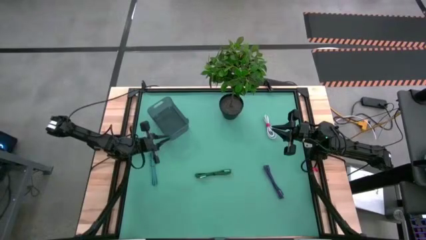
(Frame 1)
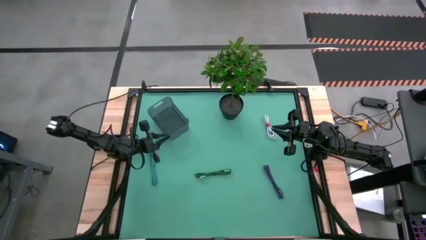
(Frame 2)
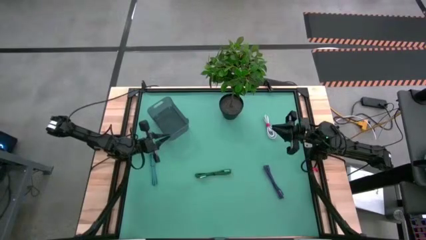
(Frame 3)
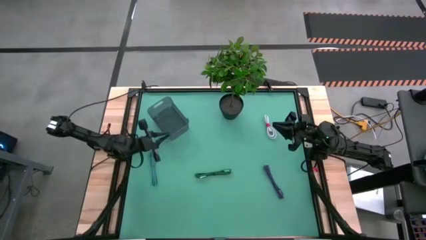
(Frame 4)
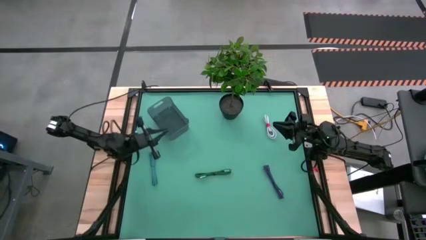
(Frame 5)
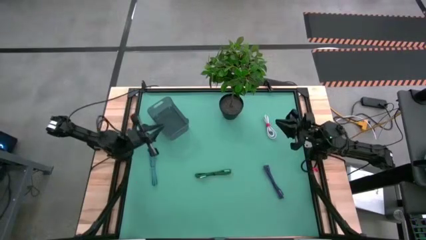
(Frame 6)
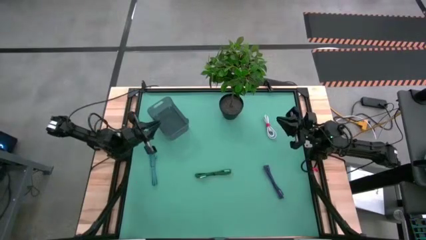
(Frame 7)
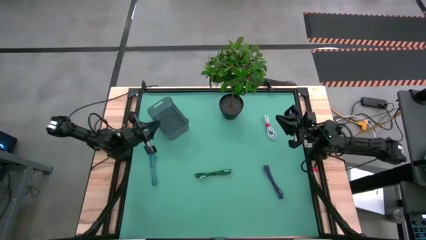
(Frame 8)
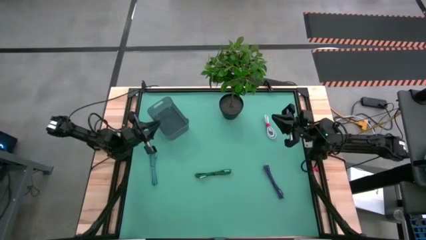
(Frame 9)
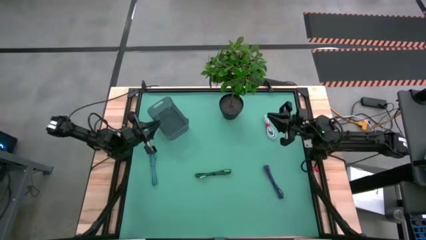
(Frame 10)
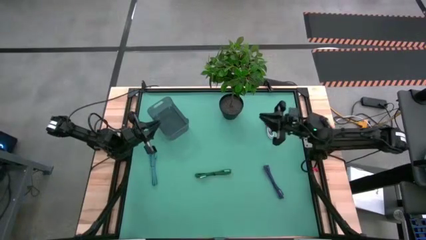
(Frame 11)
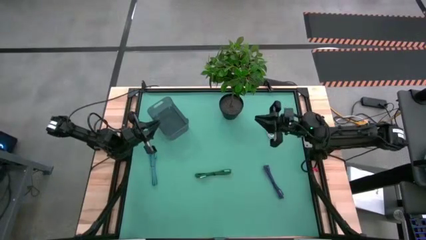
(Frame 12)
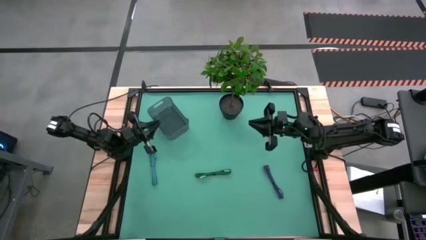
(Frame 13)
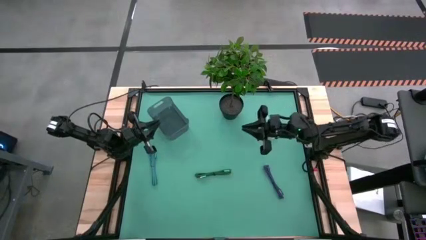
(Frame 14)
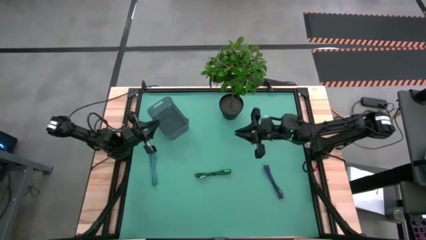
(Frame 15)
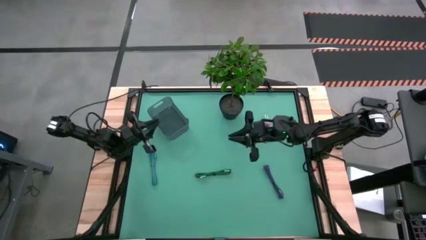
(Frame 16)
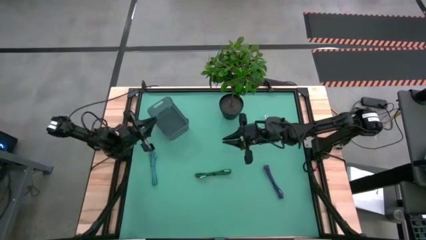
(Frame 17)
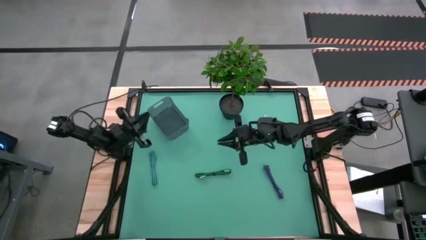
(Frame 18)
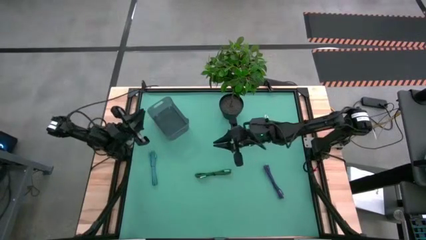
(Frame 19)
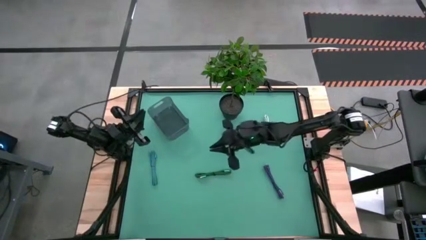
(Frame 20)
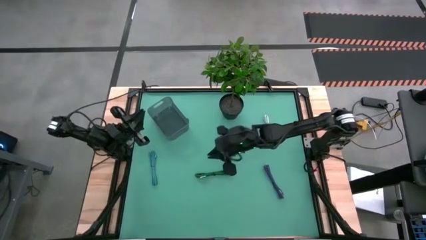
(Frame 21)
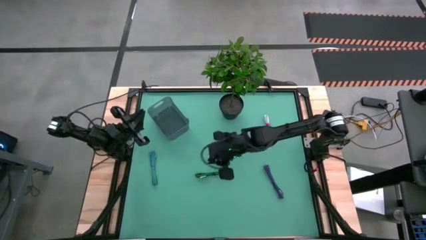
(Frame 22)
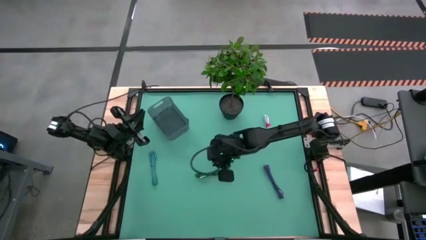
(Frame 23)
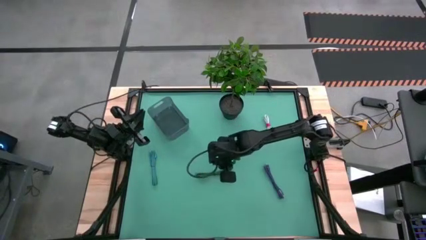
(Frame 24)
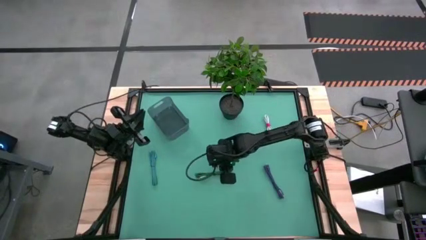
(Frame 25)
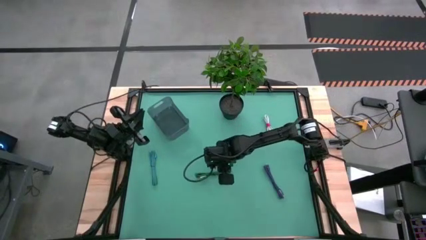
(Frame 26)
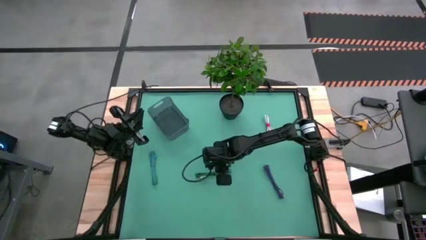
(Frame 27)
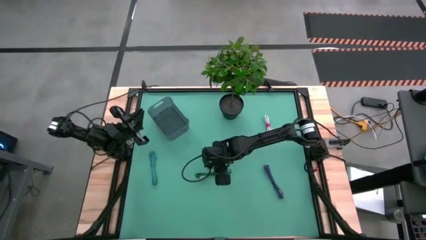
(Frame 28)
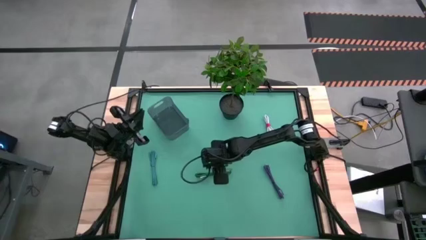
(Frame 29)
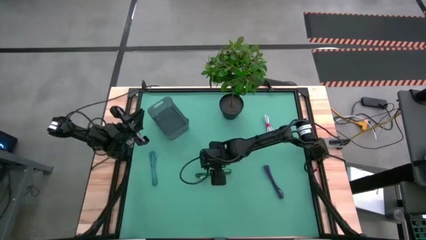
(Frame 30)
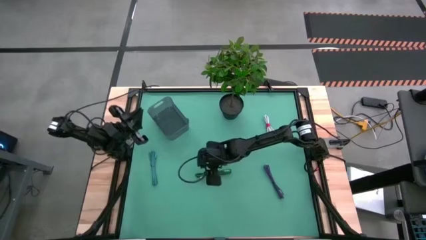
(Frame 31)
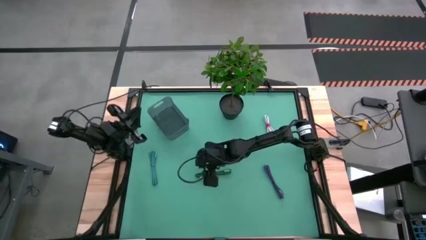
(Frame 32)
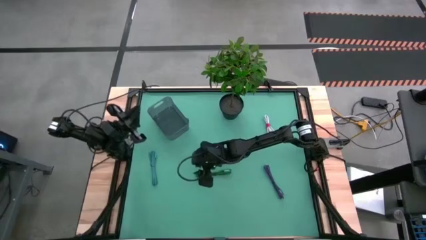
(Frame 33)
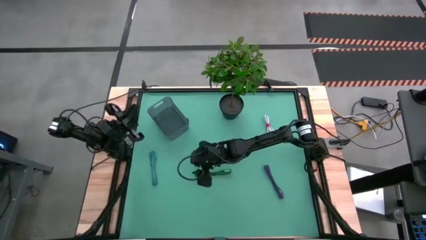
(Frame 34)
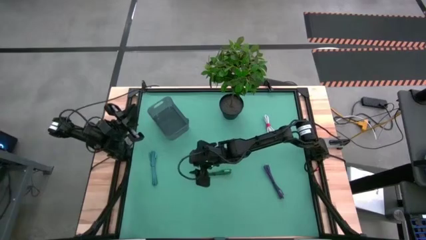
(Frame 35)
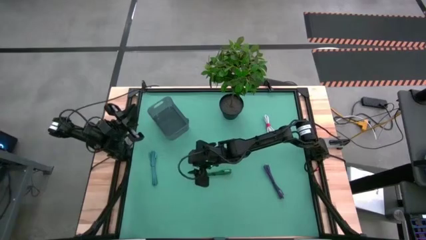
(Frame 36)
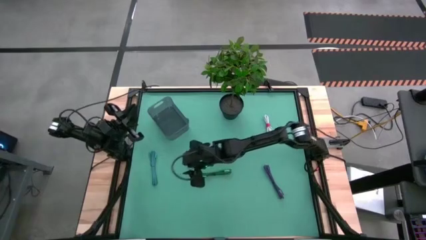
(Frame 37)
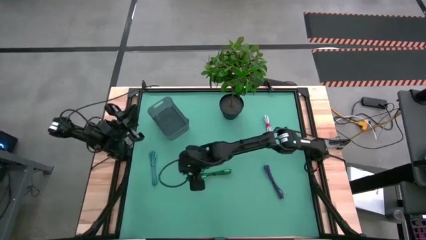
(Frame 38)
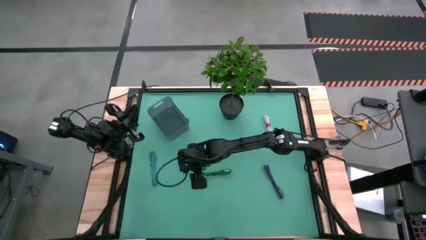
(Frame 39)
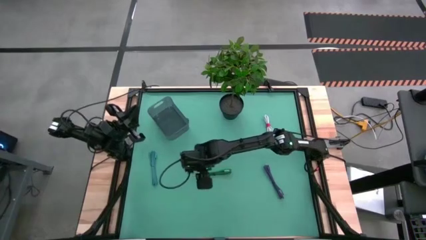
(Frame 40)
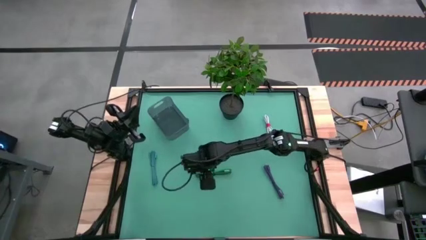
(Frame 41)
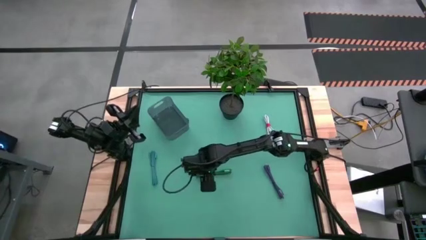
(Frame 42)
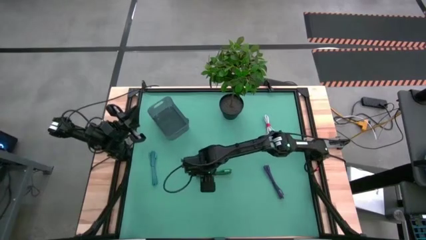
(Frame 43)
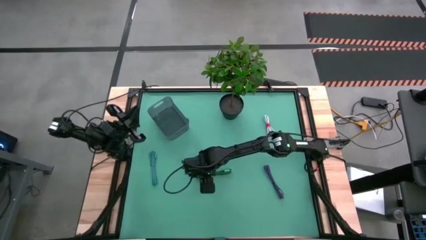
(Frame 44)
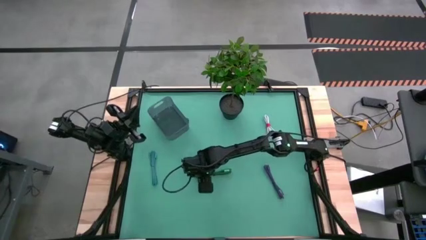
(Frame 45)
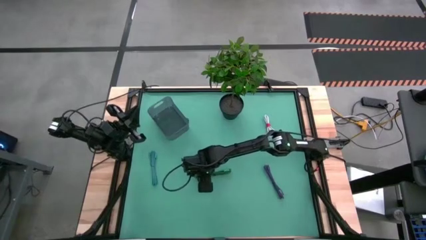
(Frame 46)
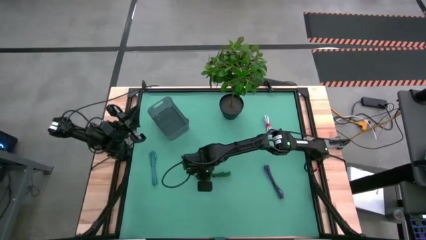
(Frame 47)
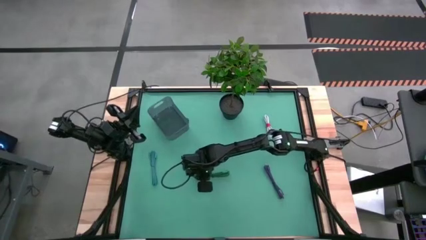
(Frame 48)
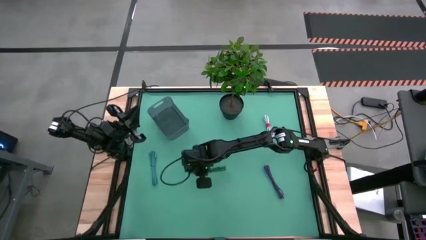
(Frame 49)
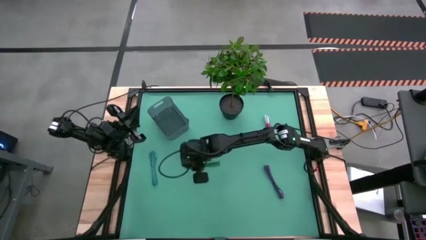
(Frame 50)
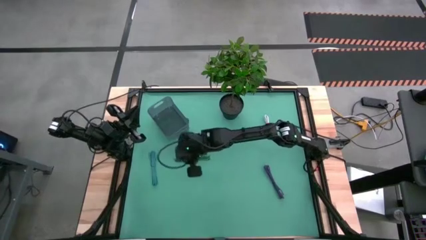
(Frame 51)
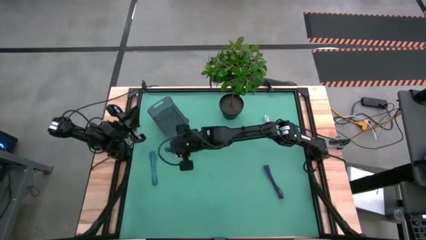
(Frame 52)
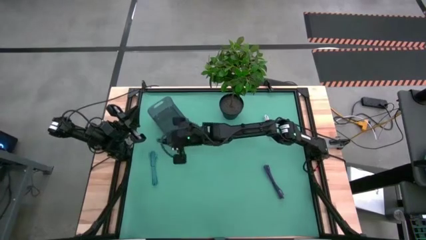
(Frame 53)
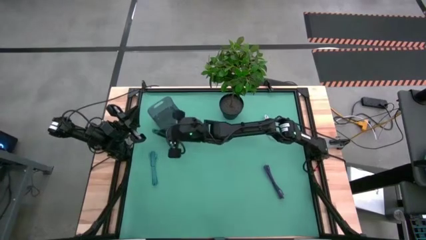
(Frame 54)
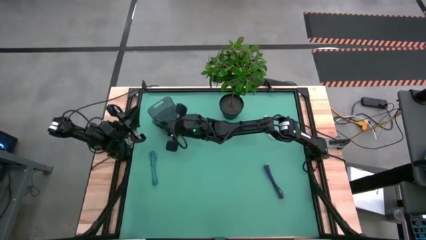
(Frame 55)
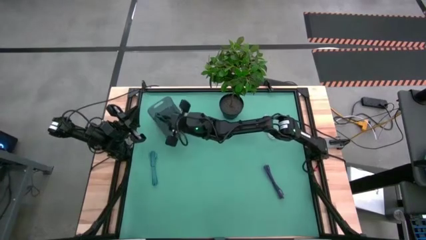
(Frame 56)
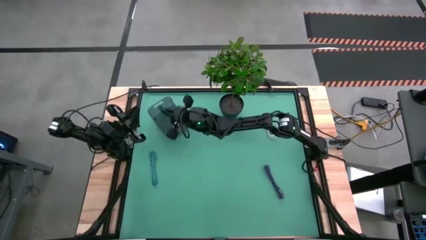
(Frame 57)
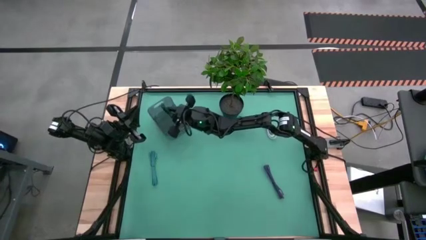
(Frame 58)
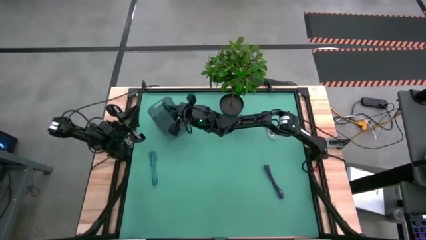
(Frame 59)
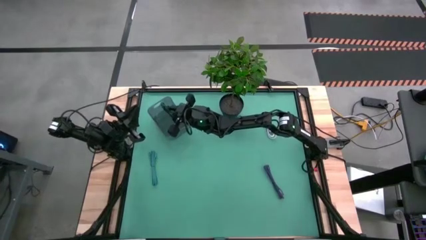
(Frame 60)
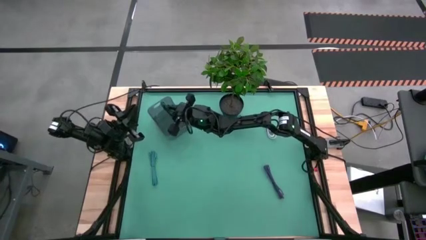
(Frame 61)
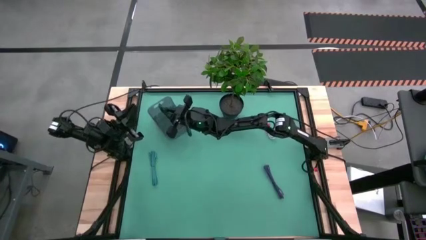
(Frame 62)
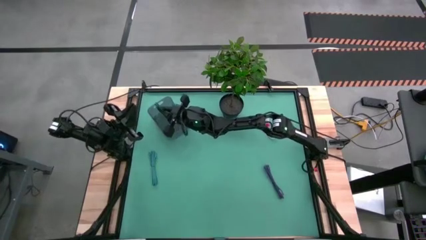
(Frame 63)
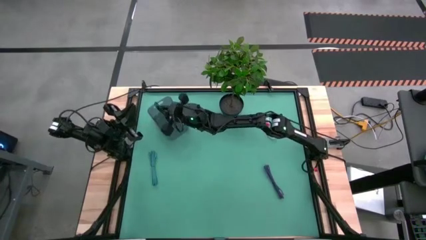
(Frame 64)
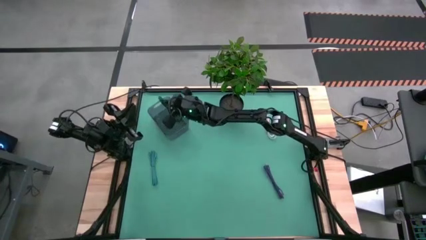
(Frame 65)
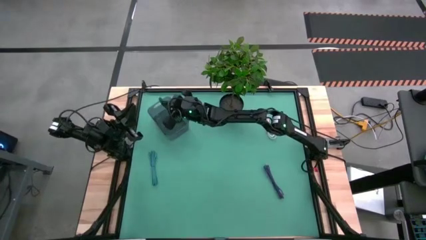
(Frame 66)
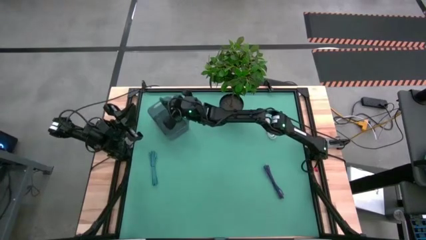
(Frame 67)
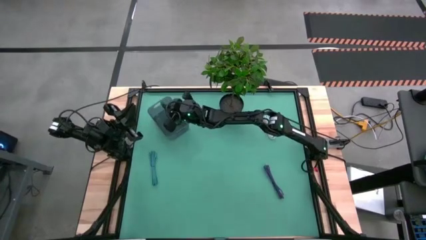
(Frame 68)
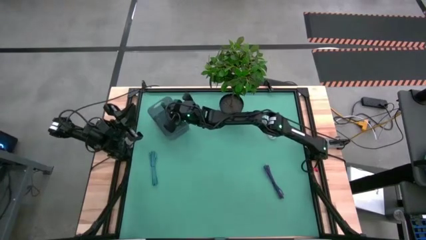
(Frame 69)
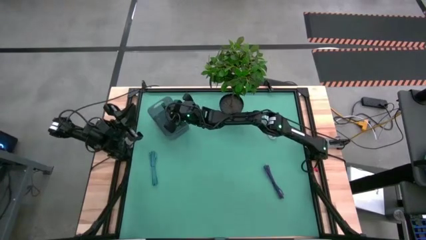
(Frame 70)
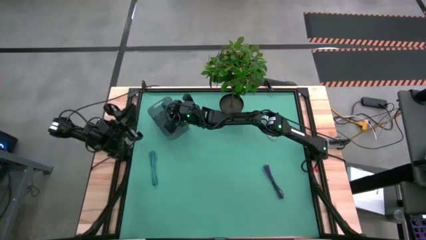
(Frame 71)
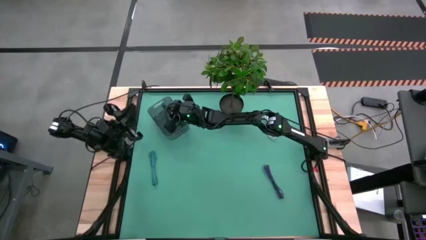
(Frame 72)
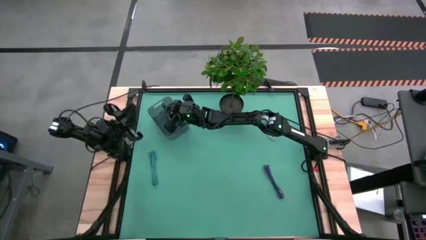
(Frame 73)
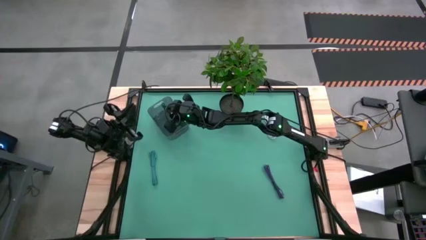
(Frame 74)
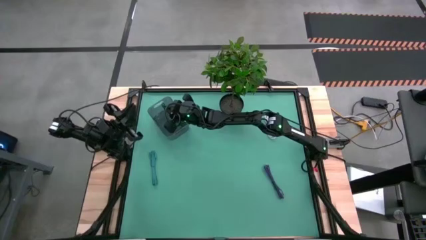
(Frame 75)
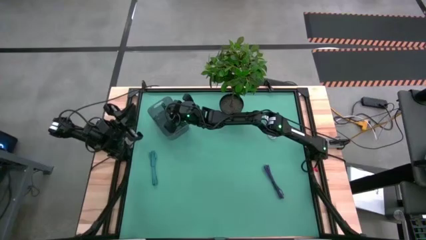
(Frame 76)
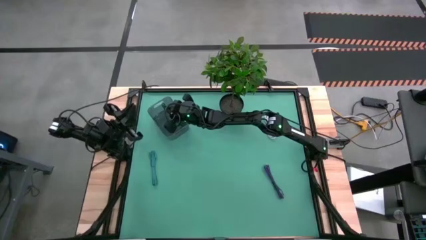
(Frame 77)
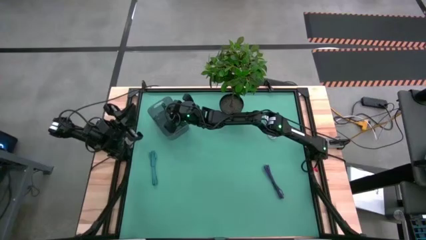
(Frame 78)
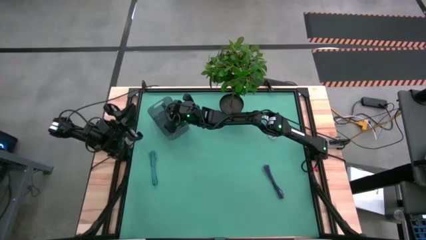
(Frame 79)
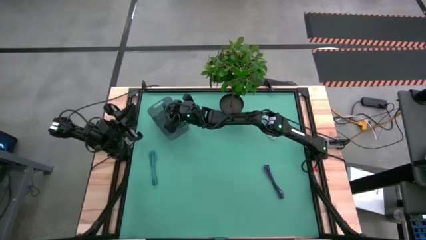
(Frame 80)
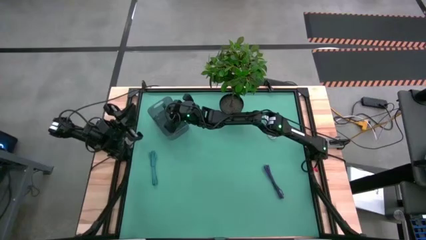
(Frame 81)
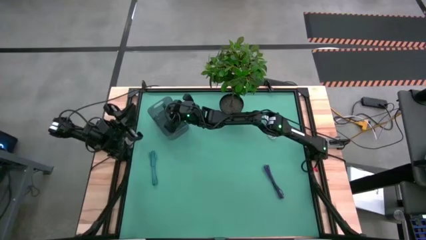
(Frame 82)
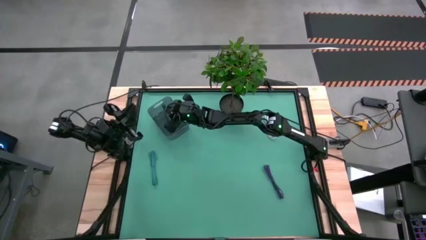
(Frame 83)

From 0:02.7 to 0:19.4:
Task: Pick and place USB-C Cables
Put the green charger cable into the gray bin
